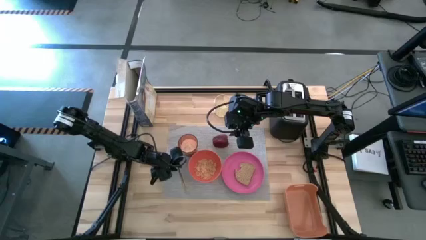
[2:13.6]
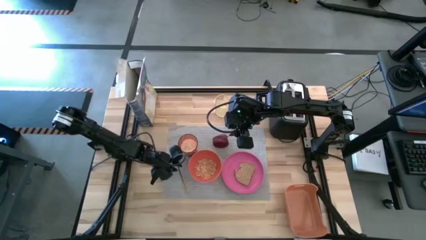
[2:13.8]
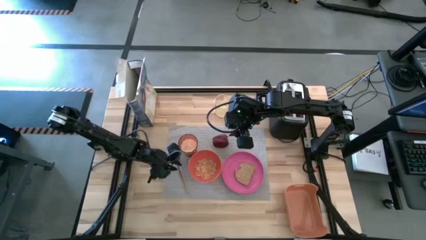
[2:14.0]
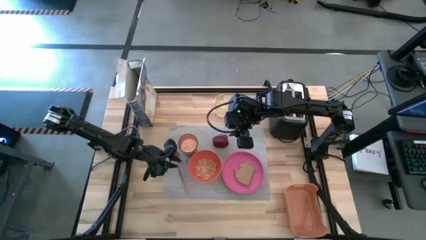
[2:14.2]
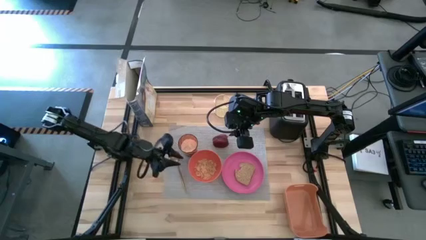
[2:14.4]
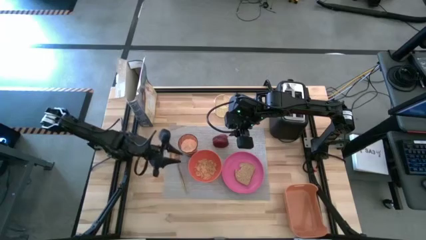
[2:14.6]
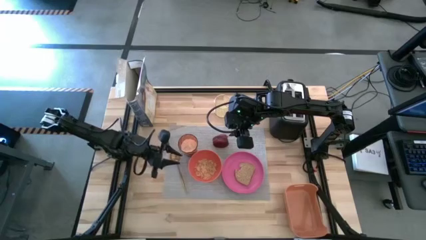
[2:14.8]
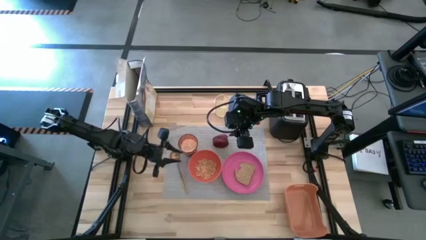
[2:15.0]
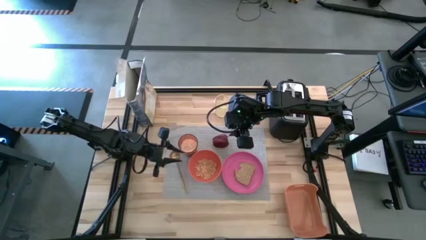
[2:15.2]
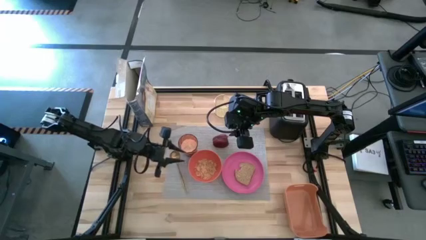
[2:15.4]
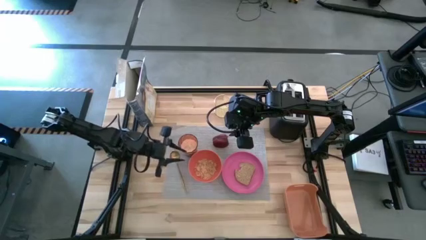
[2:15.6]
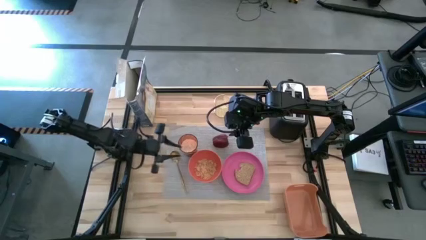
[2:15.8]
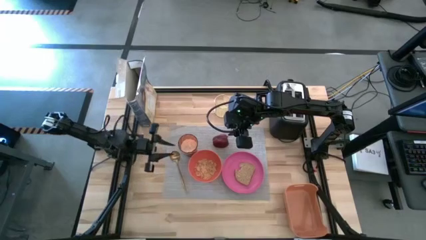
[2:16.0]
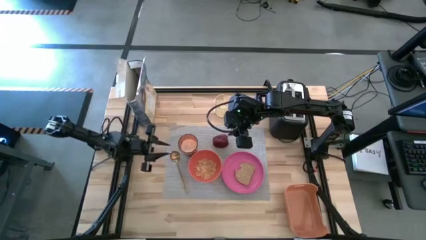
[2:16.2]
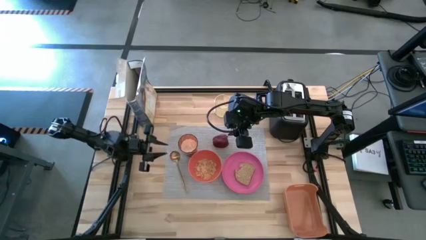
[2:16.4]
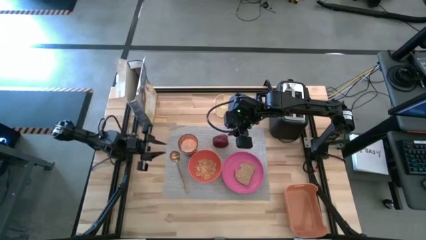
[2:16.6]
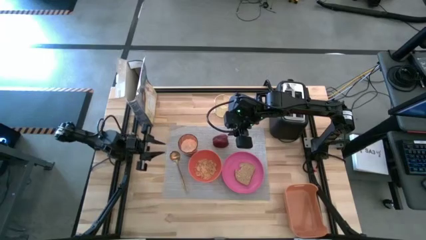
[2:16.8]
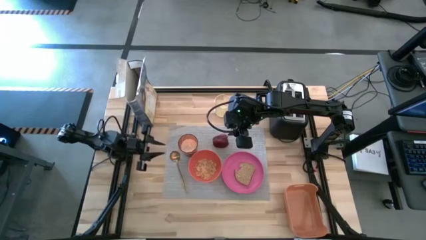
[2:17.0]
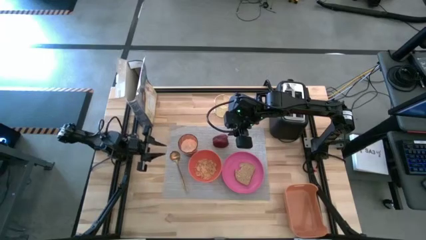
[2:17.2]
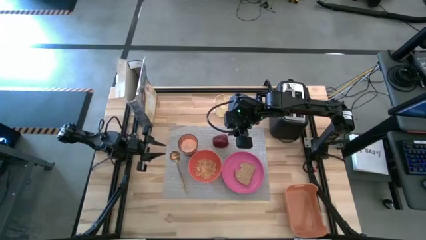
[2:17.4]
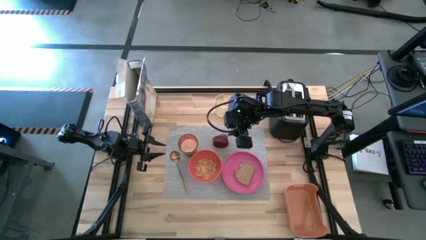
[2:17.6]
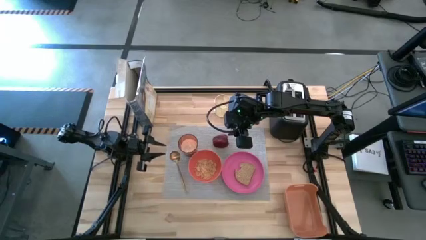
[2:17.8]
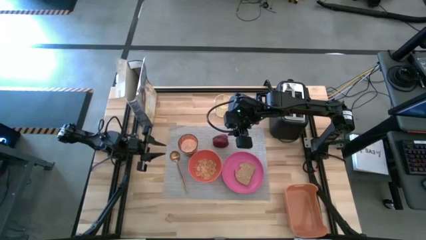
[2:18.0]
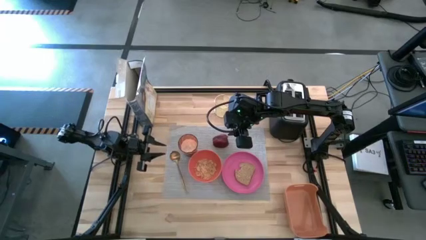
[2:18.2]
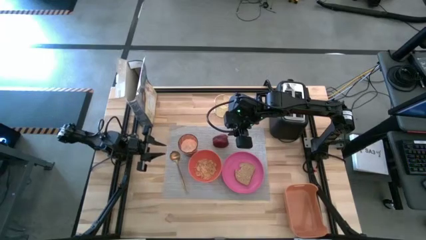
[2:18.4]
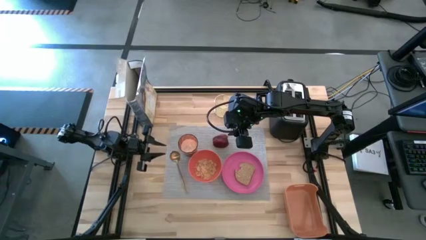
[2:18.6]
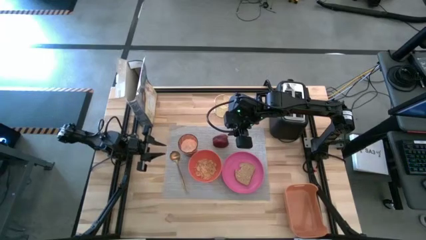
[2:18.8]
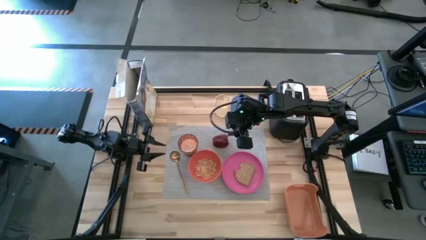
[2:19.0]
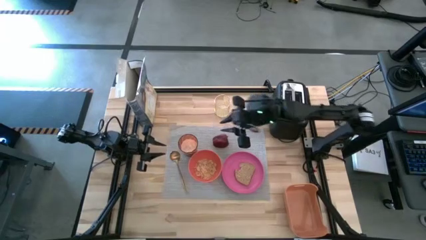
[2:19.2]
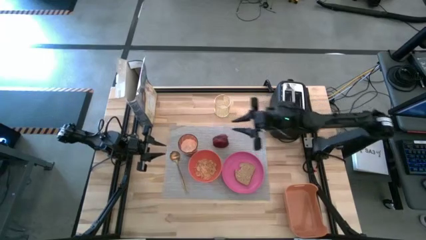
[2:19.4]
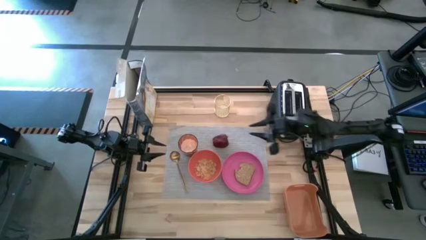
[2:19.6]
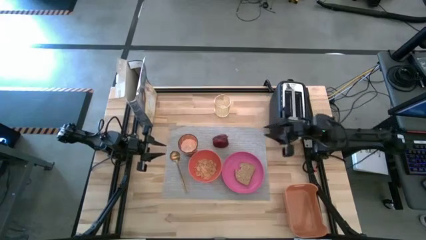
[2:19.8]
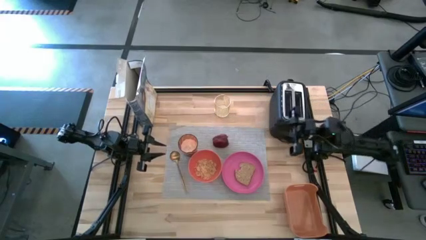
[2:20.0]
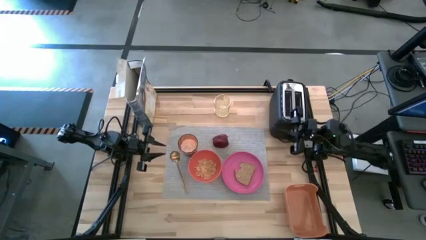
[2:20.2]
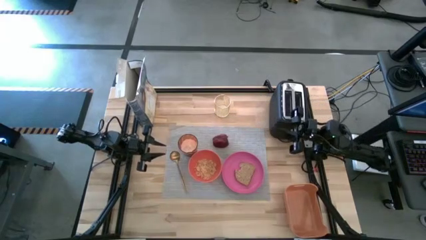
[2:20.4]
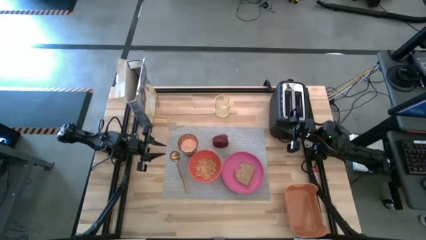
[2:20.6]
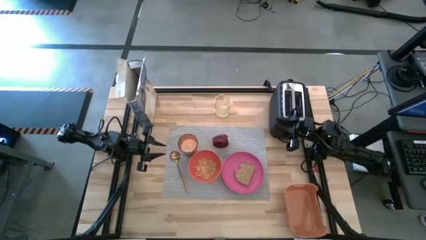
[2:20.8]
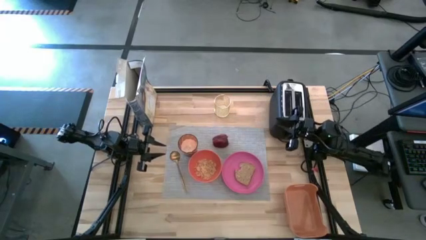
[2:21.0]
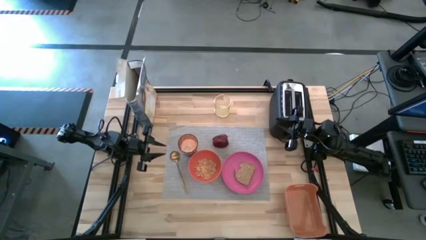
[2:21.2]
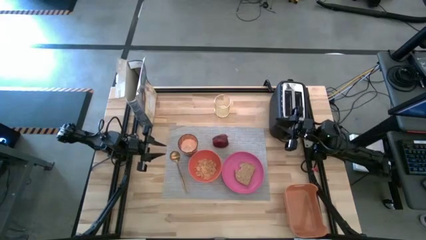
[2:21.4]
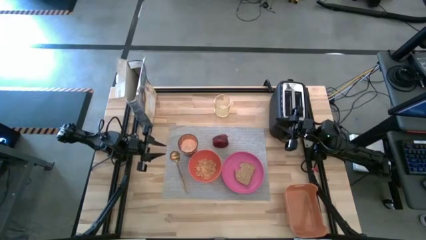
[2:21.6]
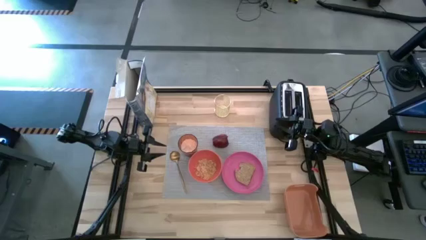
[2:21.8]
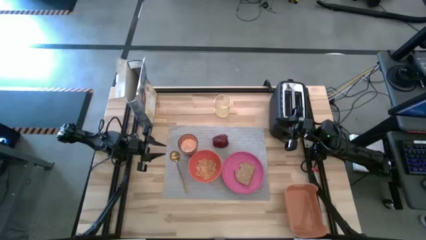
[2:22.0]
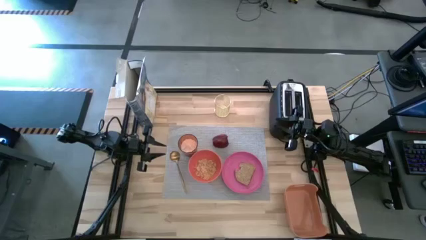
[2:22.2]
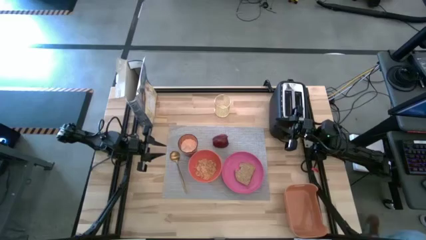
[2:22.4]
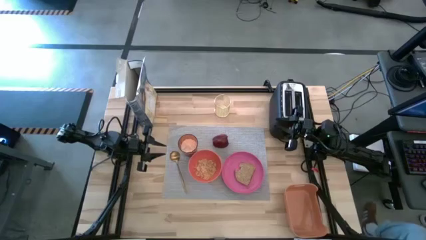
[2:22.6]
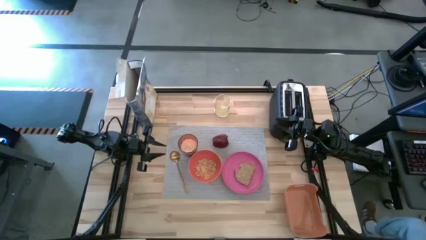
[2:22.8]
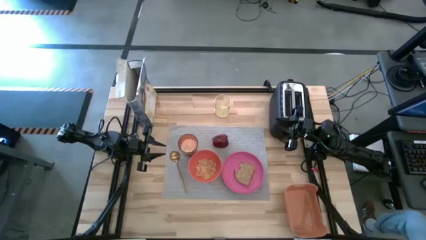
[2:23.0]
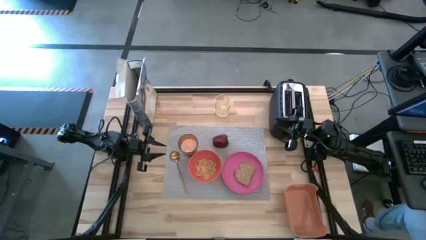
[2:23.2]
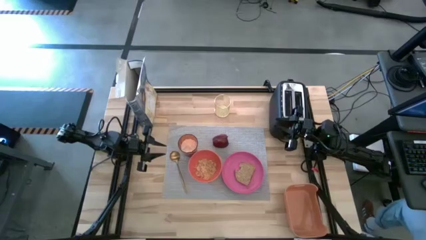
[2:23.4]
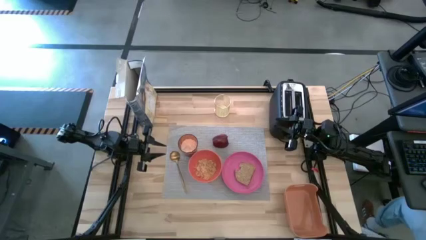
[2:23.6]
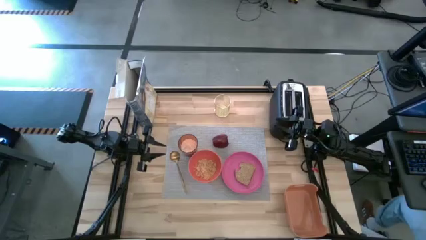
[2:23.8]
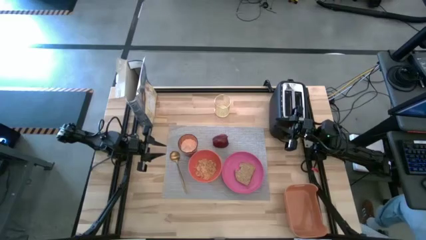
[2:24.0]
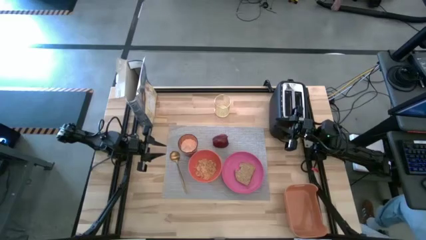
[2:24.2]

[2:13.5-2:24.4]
Task: Arrange a breakfast setting
Return to Home Position
